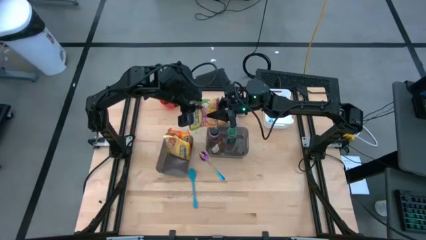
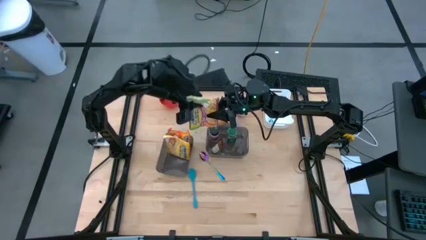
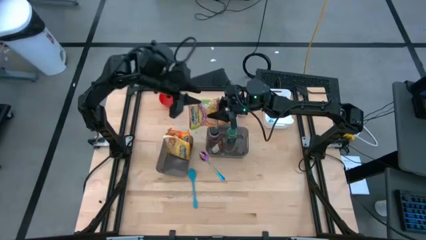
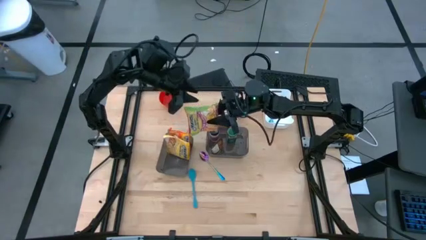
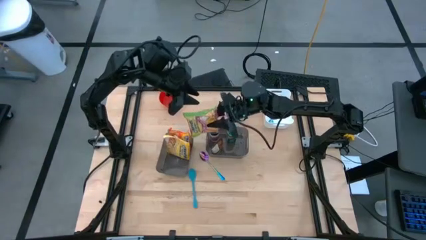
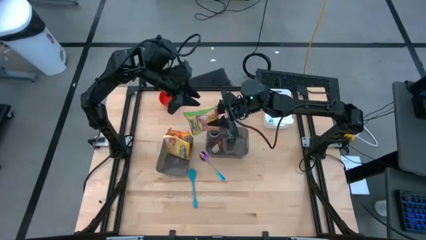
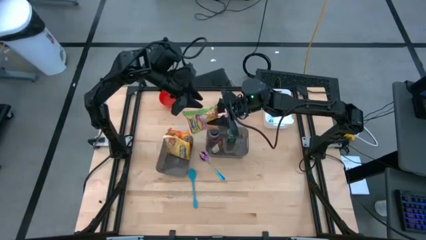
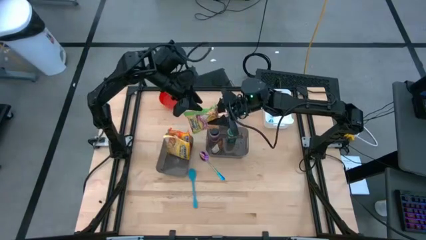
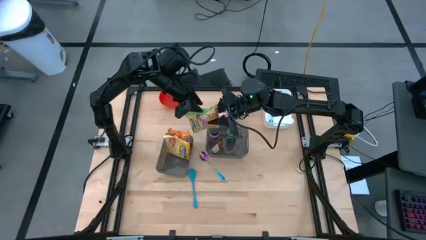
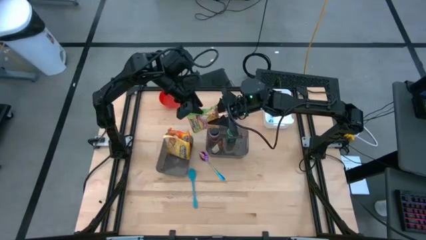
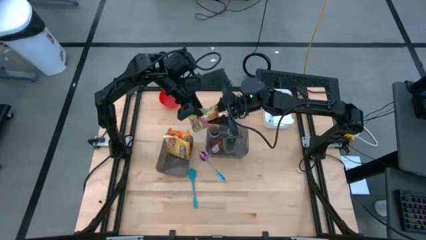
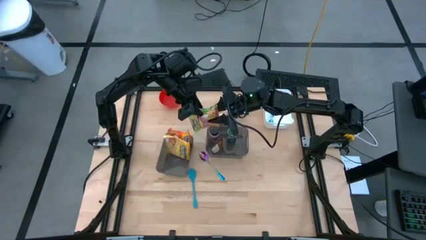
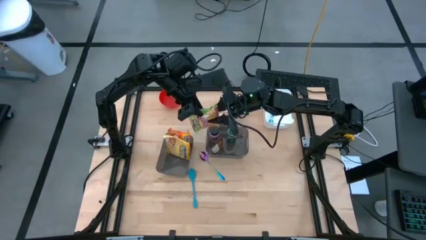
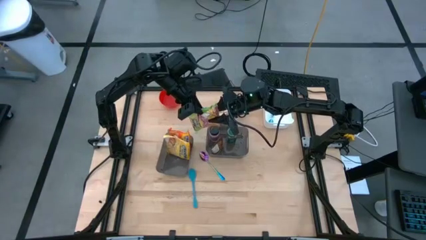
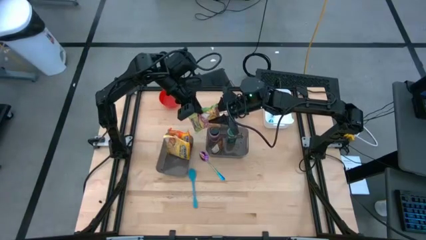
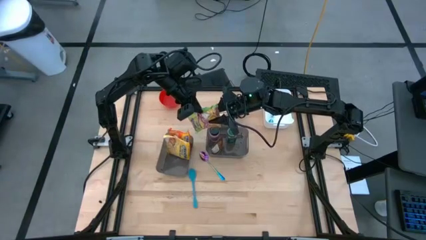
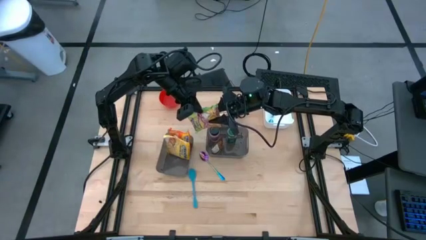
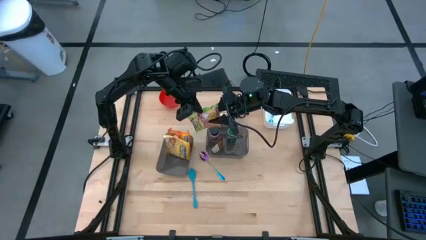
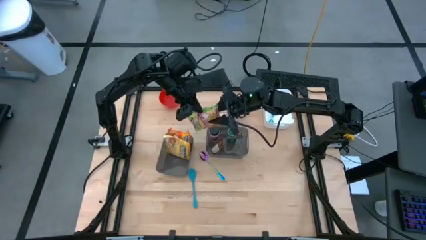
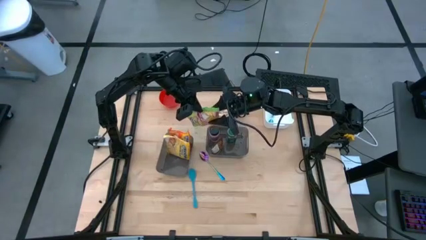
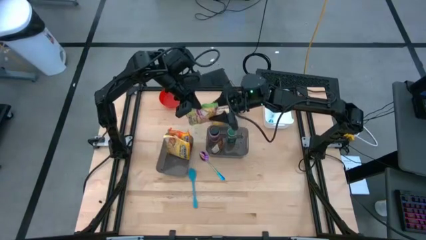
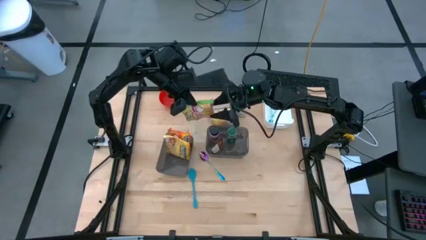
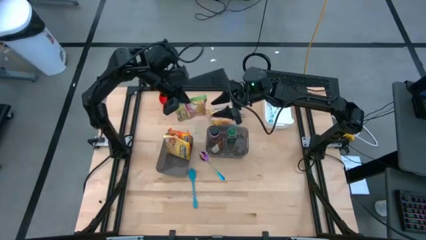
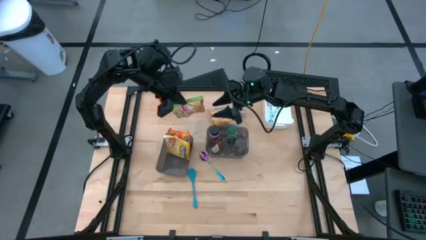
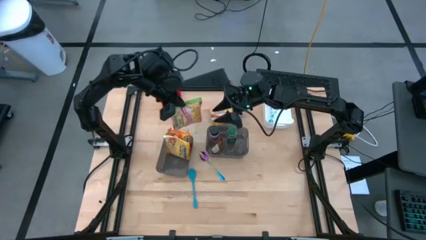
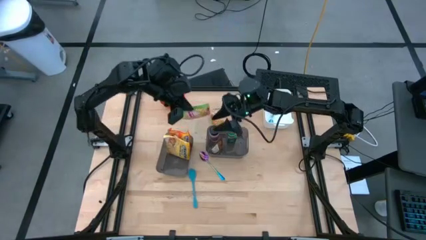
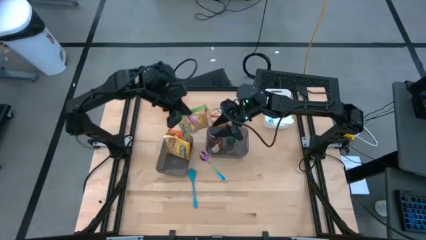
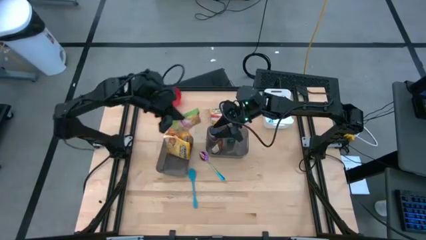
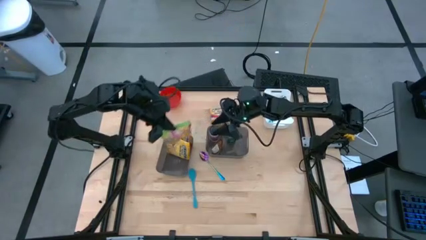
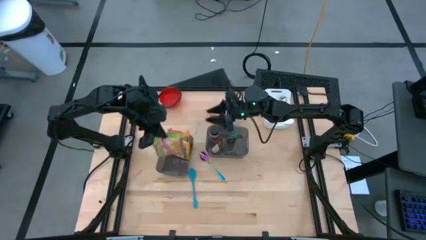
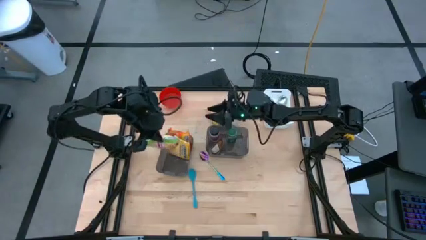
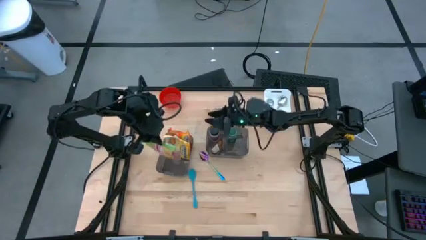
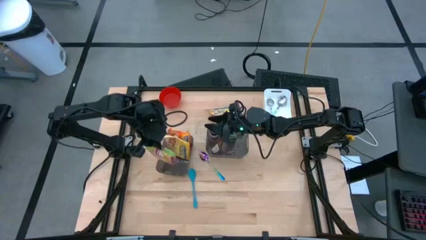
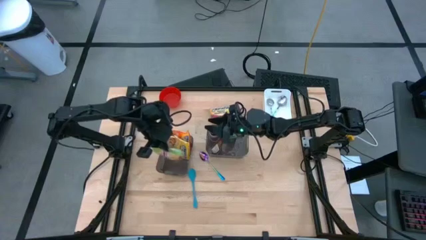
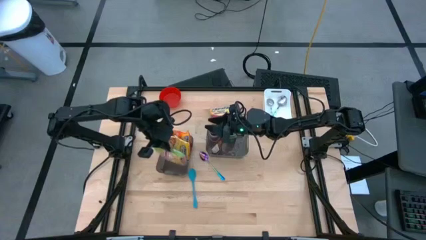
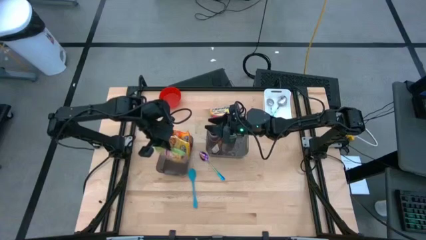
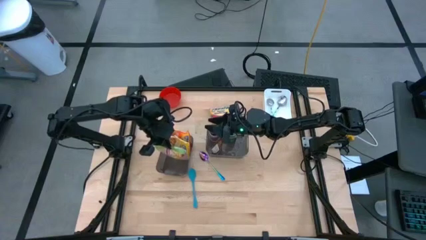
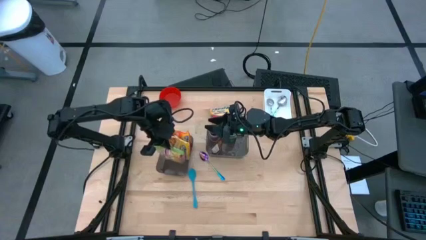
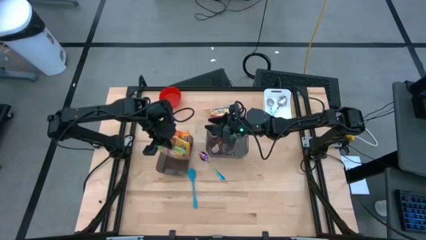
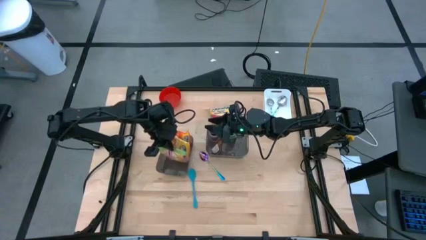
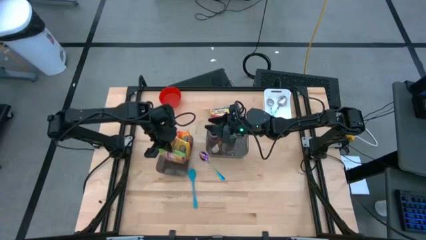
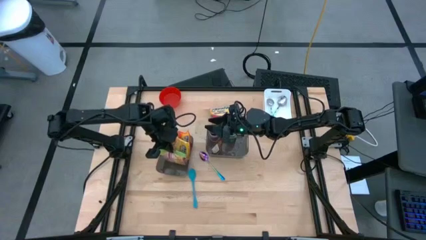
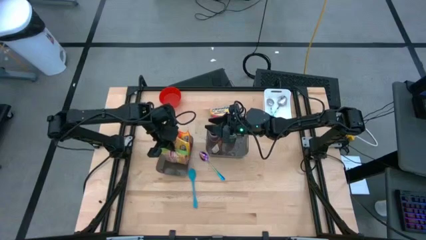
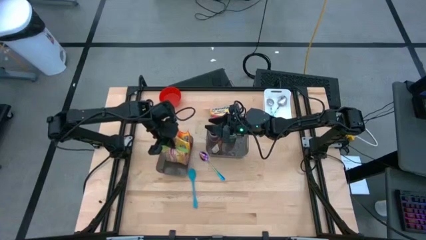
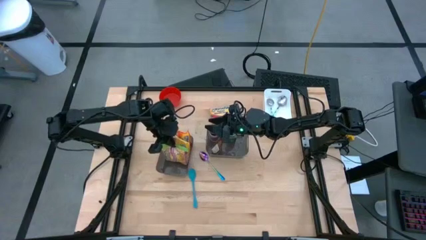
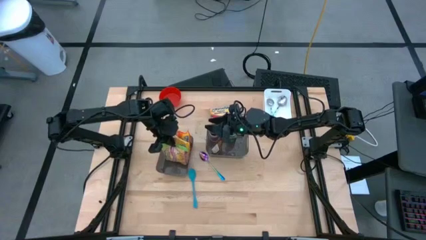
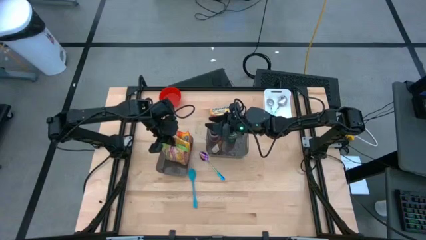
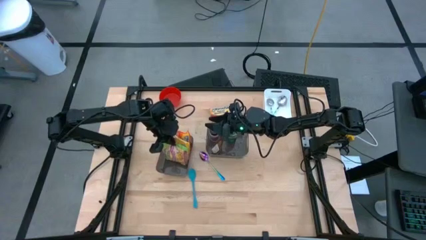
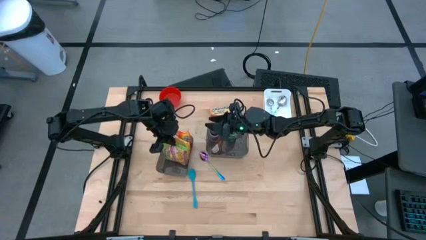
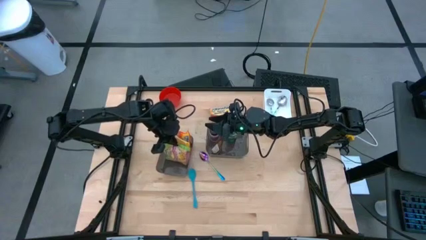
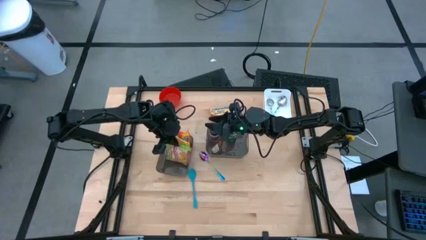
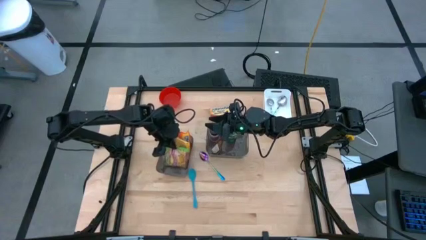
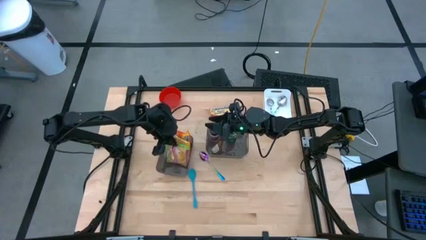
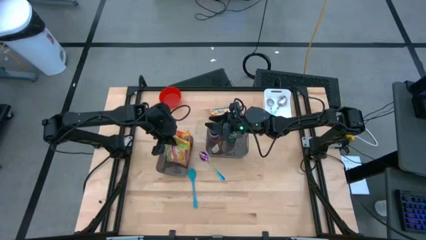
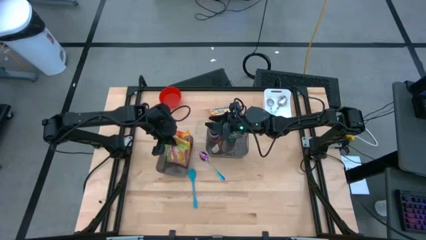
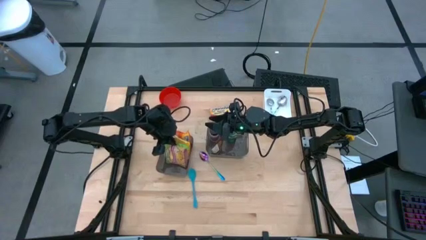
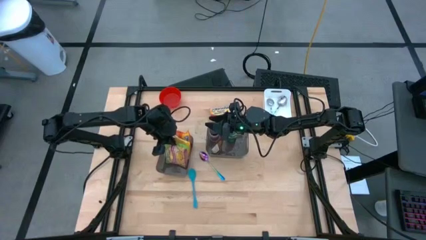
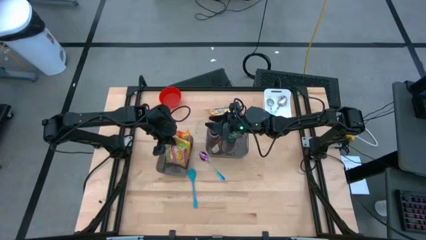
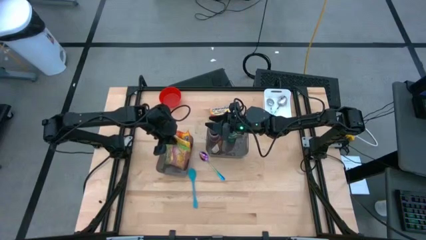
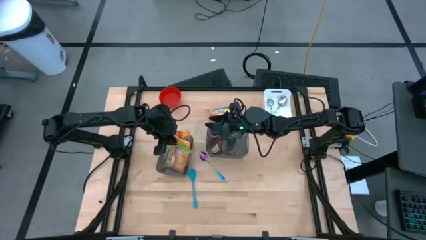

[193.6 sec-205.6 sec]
Task: Pick & Place Food Item
Put the green noodle pack into the left black bin
